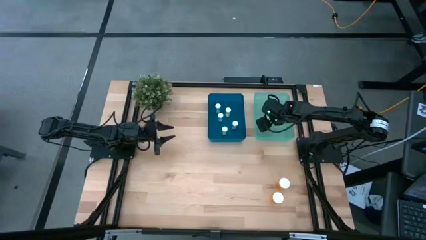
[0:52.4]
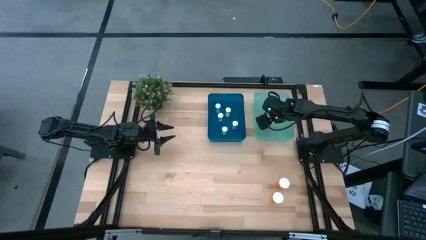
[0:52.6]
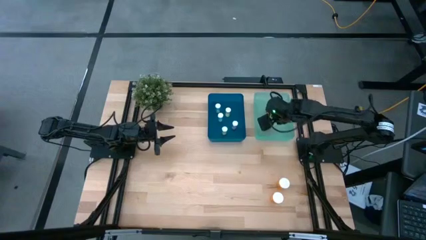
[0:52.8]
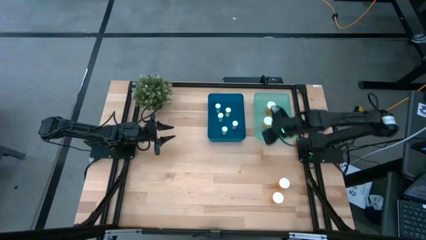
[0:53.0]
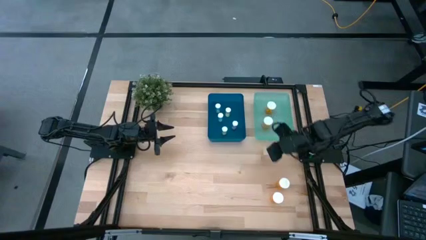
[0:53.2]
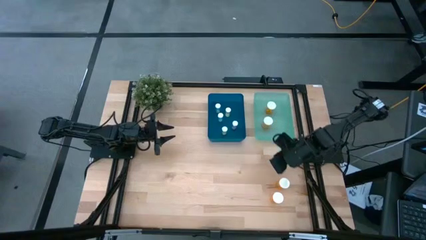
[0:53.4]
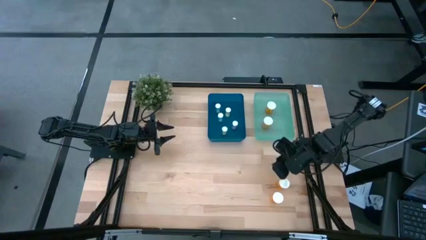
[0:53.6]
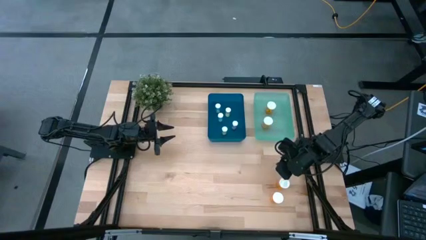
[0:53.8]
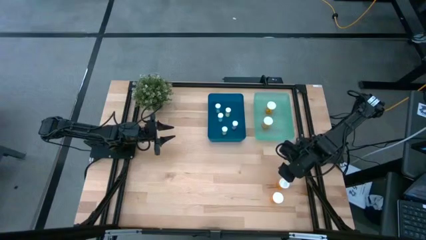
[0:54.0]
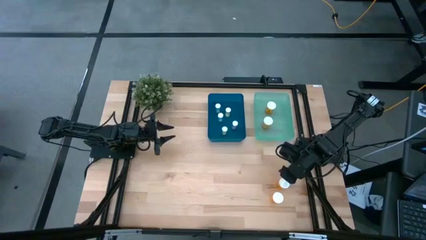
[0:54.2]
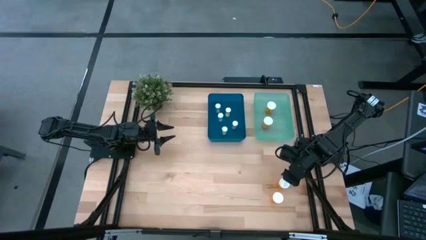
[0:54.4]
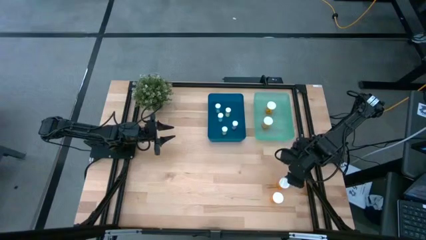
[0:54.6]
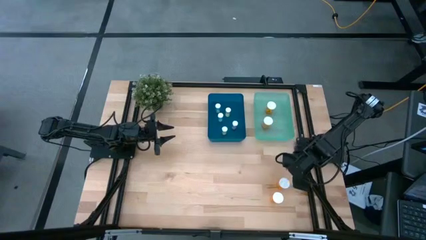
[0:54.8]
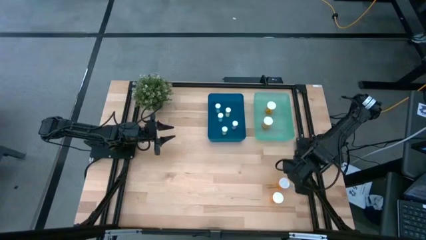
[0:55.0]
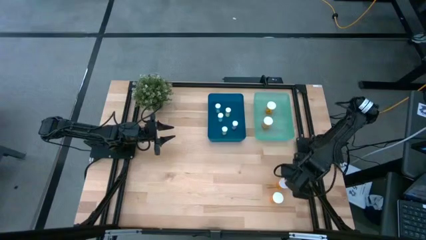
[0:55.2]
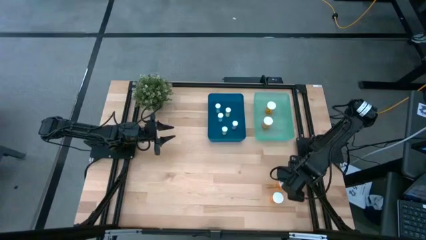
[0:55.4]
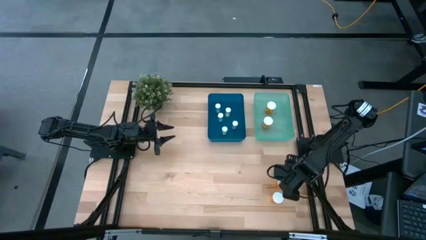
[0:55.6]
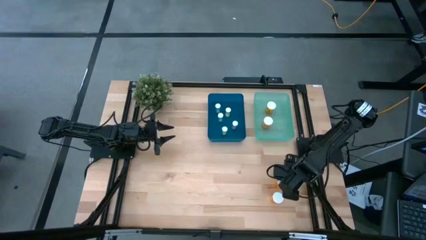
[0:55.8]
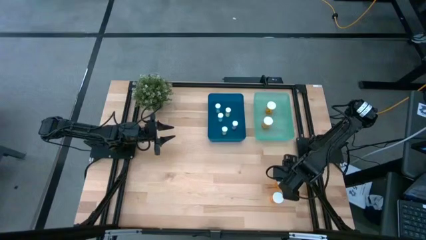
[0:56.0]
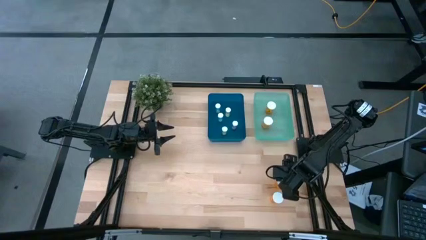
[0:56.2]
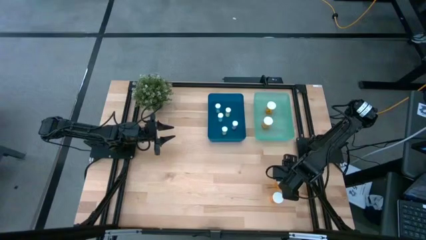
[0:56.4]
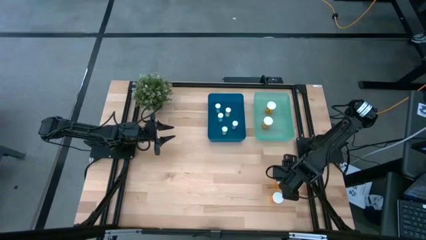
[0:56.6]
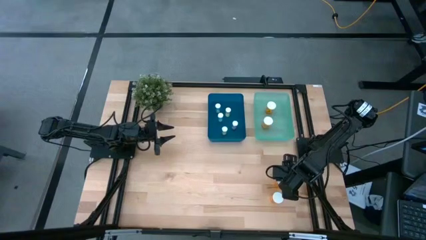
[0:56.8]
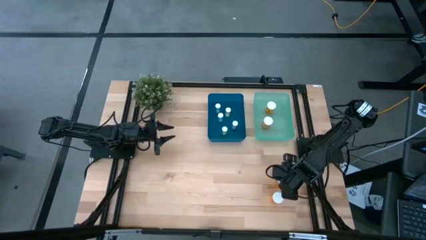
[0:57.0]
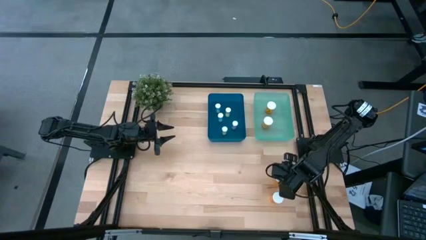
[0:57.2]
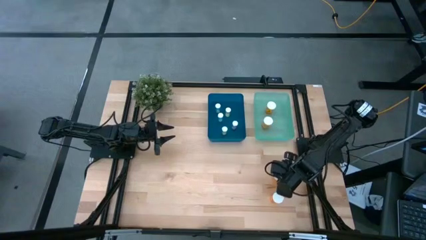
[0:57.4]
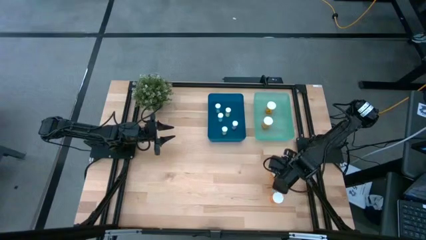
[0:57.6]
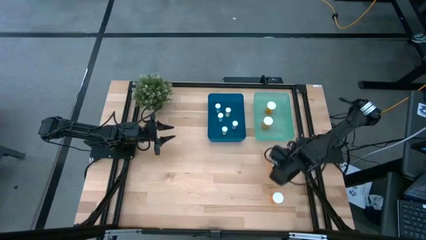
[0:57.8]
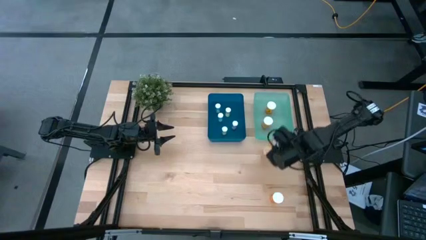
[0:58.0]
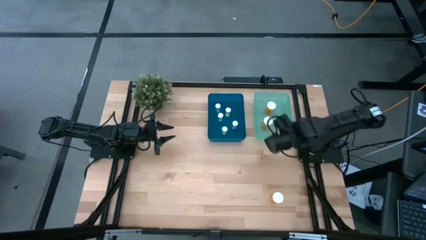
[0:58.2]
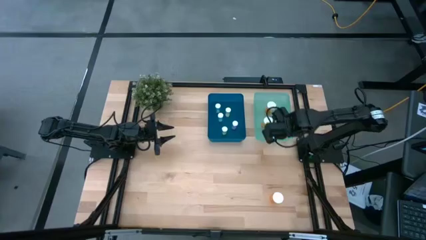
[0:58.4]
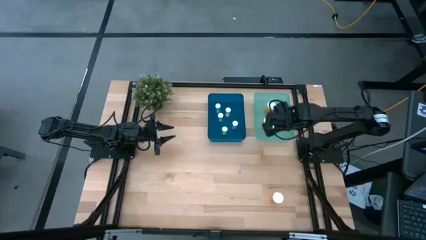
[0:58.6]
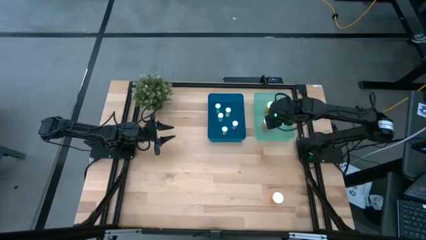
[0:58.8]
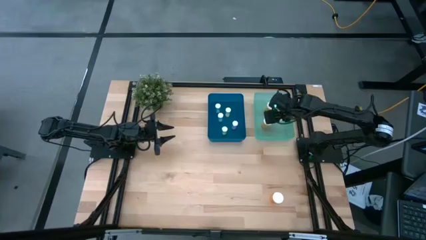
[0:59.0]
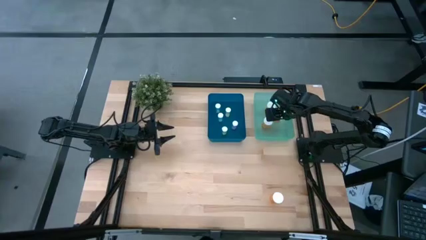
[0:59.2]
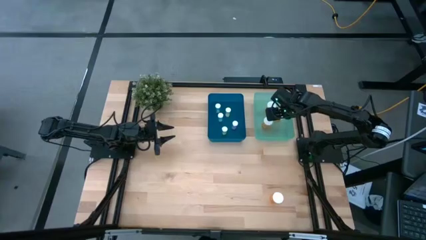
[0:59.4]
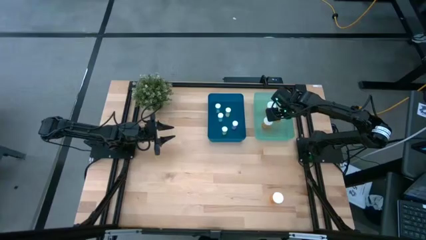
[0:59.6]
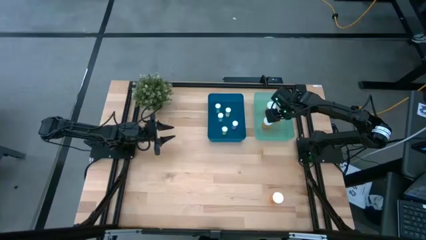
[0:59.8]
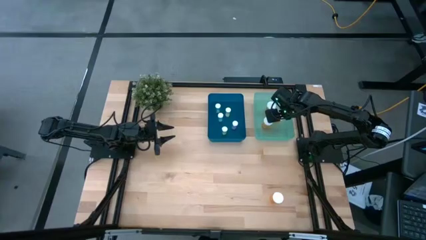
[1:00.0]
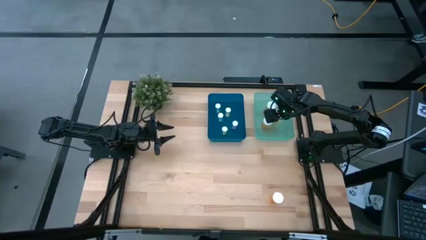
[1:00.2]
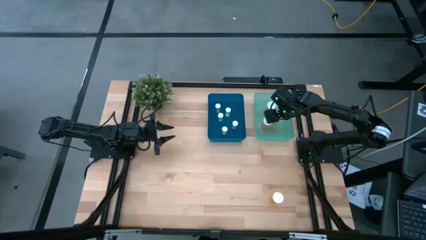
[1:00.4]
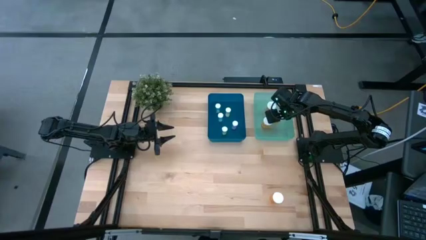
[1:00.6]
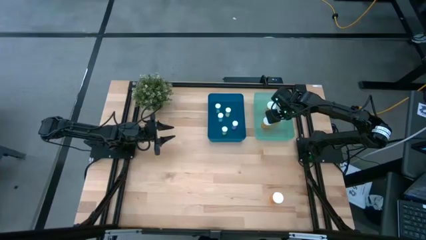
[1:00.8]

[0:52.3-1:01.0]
Task: Pick and place medicine bottles into bin by pill shape (circle, oval)
Put the large orange pill bottle into the green bin

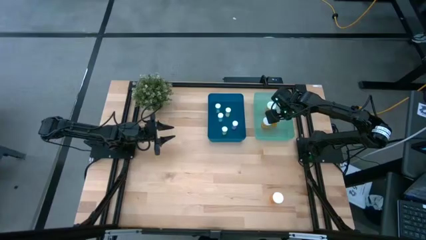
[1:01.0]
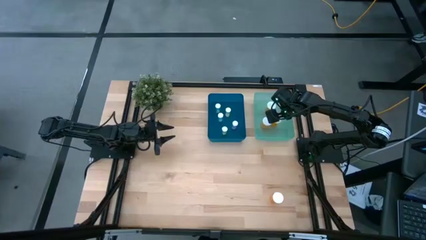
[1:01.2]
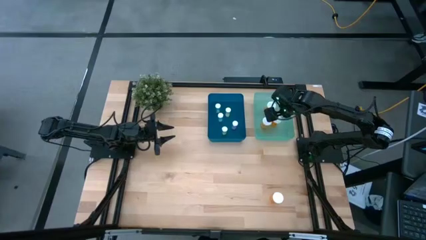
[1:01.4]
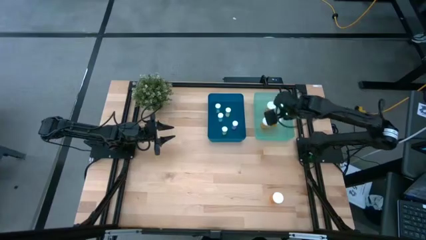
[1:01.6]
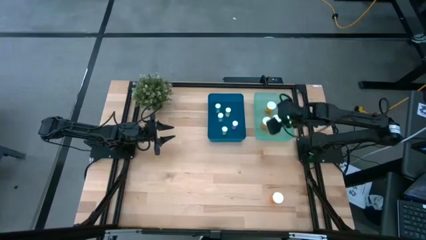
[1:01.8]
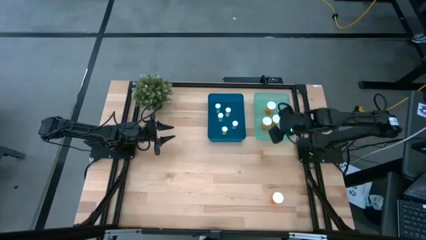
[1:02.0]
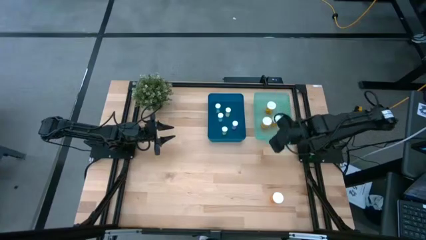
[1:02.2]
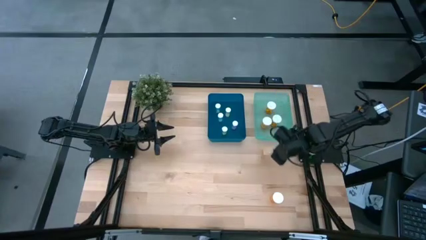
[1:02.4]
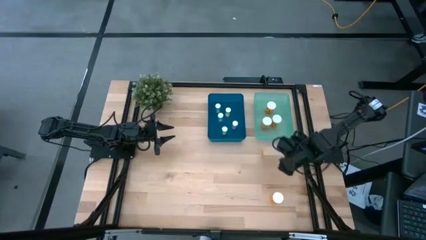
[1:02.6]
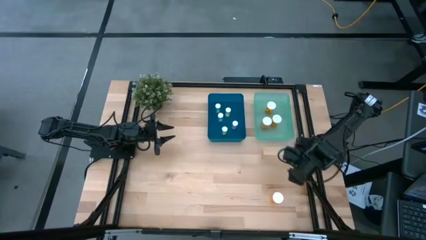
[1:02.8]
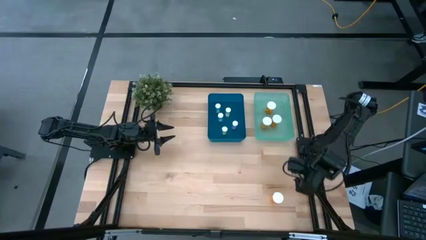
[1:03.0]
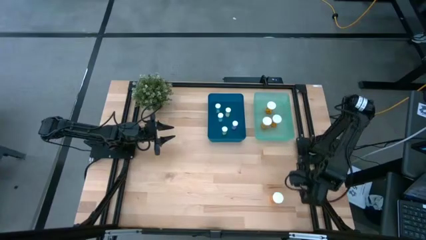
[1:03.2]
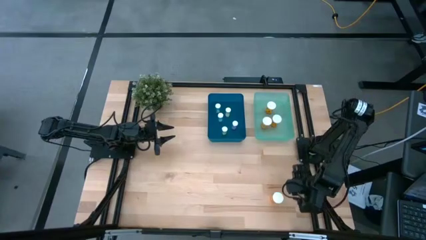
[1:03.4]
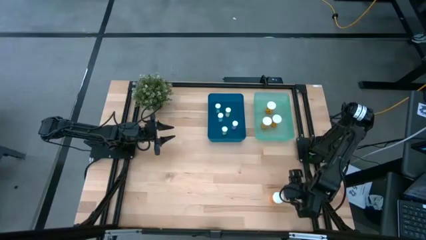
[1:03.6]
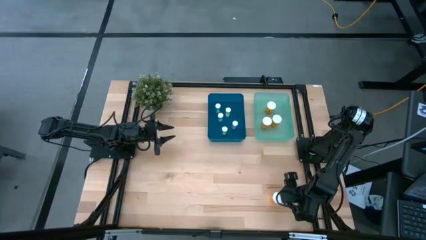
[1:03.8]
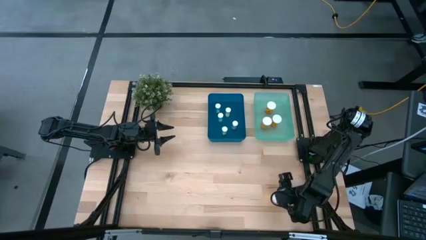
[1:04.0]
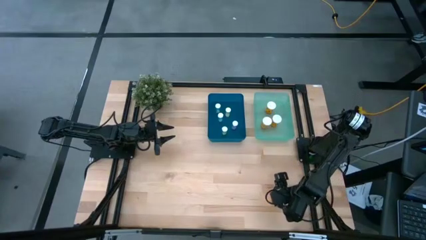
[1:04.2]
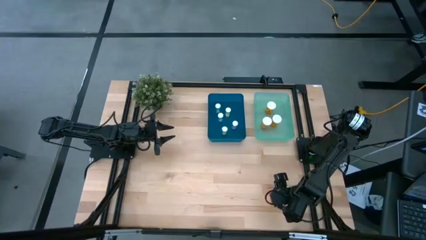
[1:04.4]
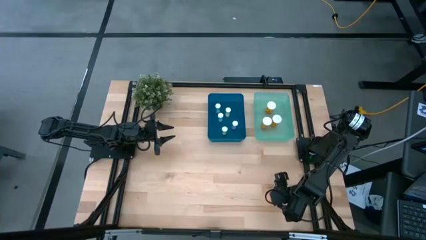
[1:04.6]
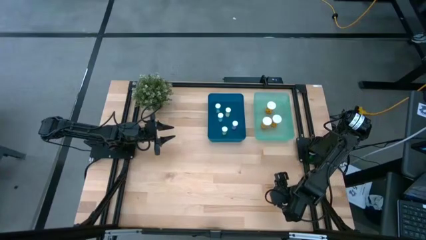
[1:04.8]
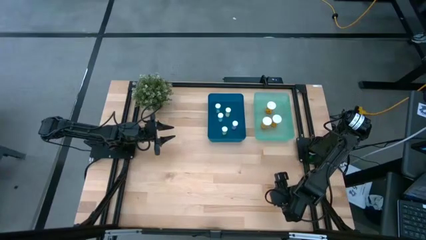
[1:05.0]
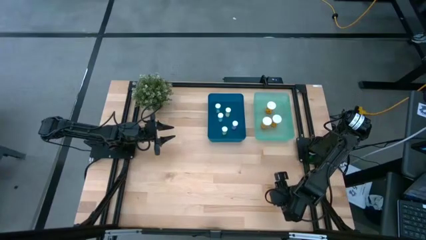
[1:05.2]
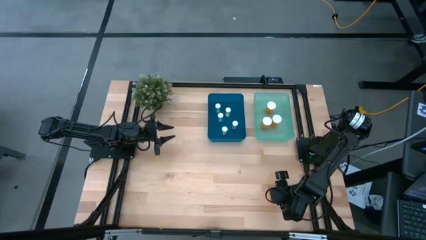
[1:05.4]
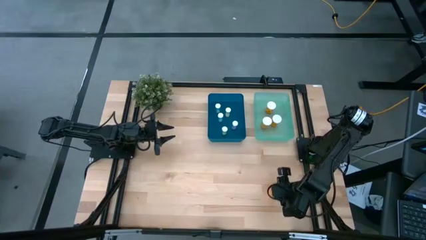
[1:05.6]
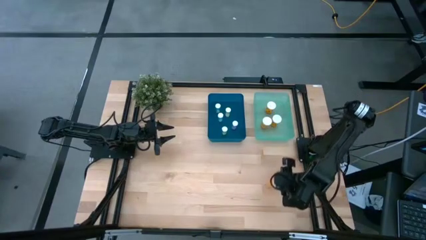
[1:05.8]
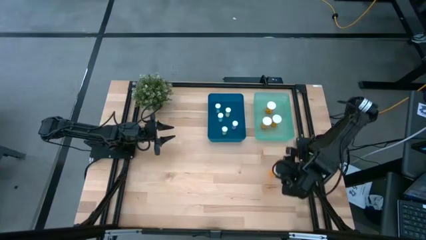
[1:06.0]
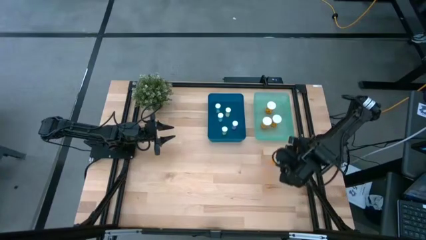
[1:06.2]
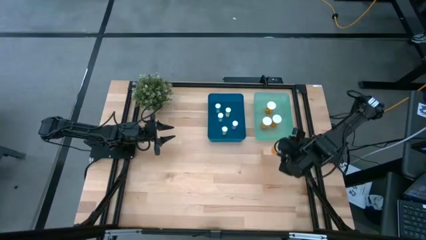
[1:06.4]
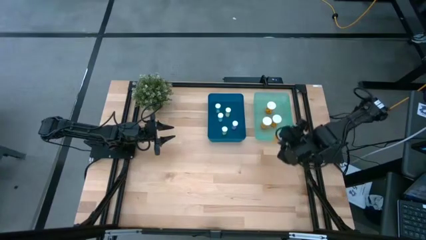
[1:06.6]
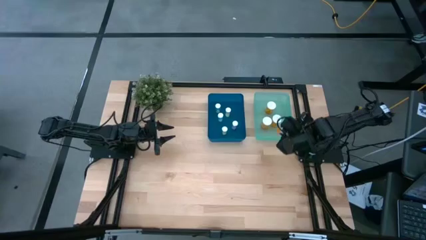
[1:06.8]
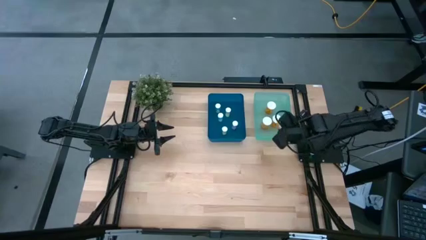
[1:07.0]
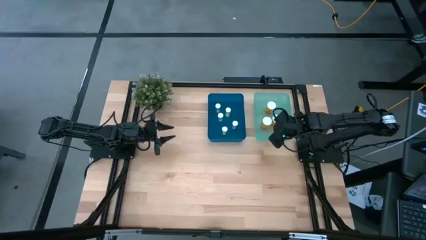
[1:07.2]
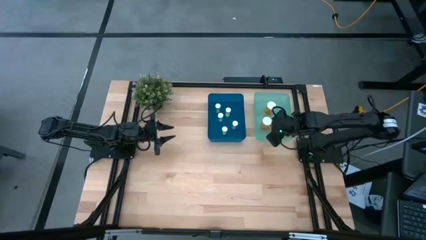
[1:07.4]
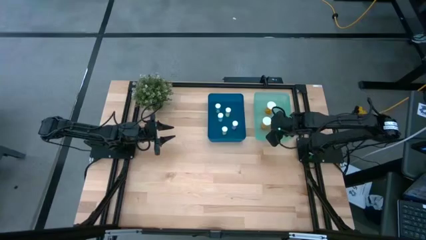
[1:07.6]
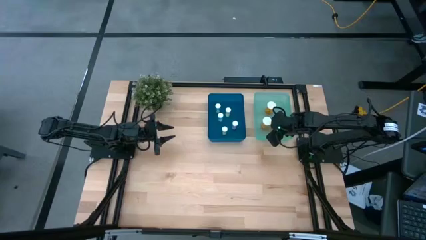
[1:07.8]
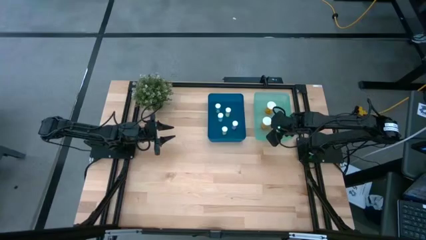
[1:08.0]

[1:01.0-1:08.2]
Put the large orange pill bottle into the green bin
